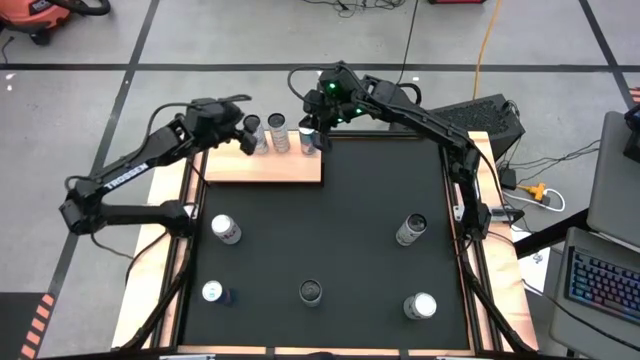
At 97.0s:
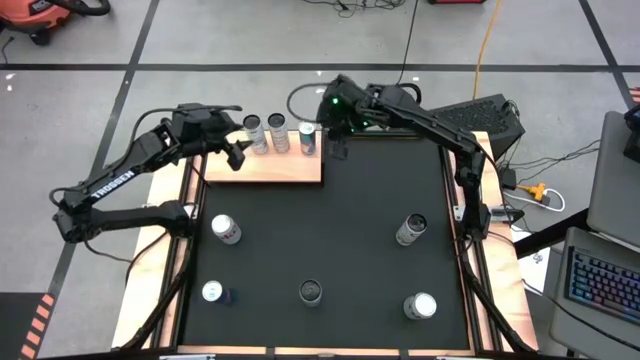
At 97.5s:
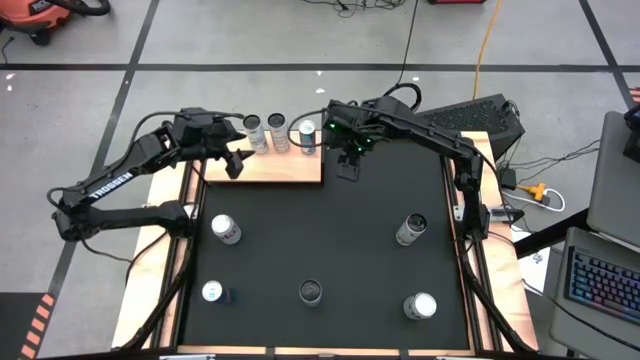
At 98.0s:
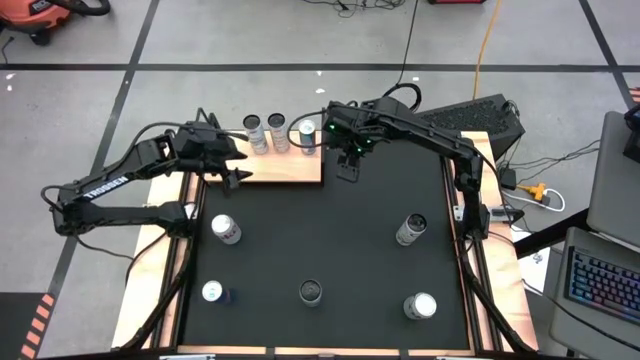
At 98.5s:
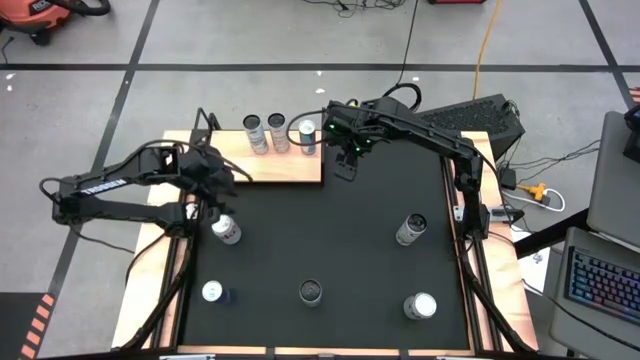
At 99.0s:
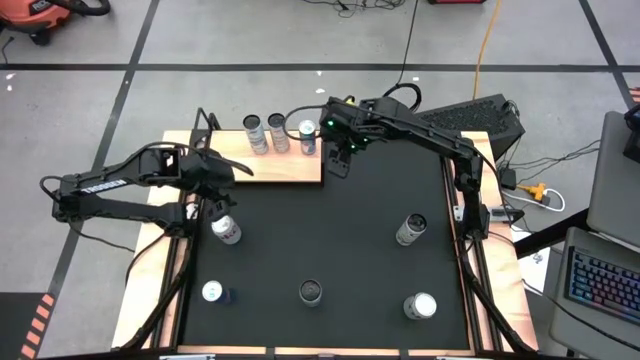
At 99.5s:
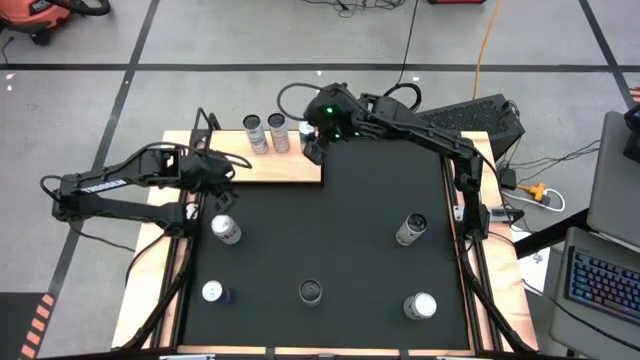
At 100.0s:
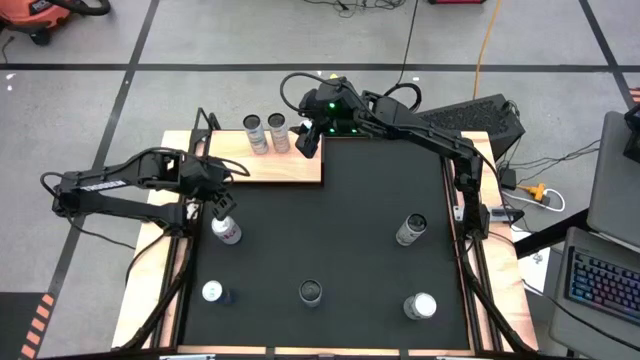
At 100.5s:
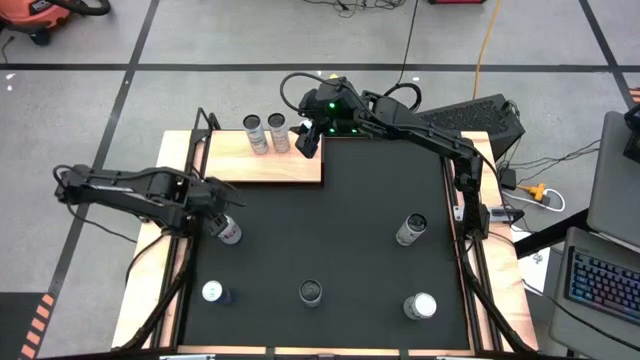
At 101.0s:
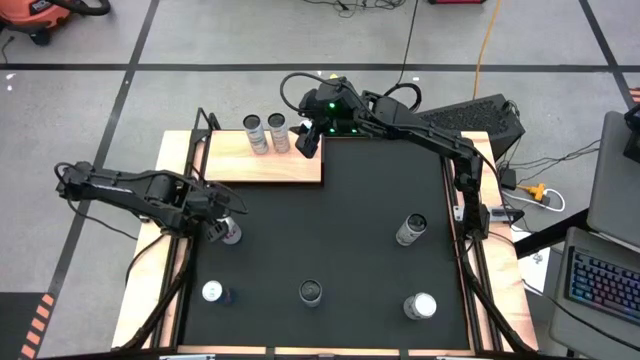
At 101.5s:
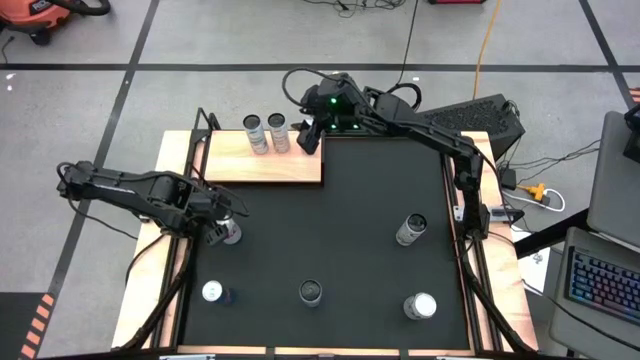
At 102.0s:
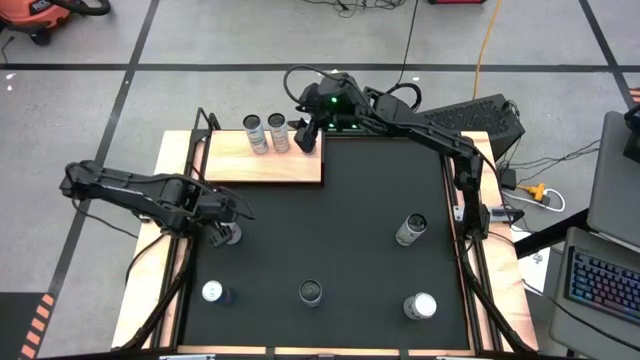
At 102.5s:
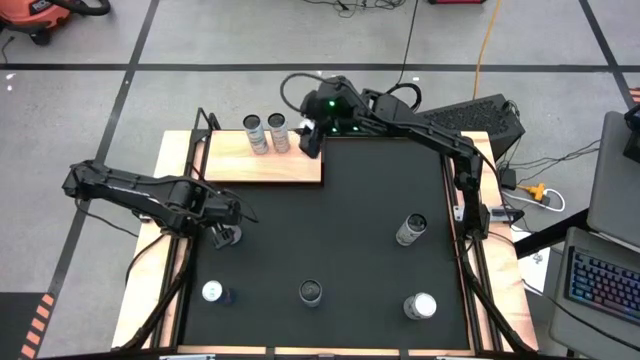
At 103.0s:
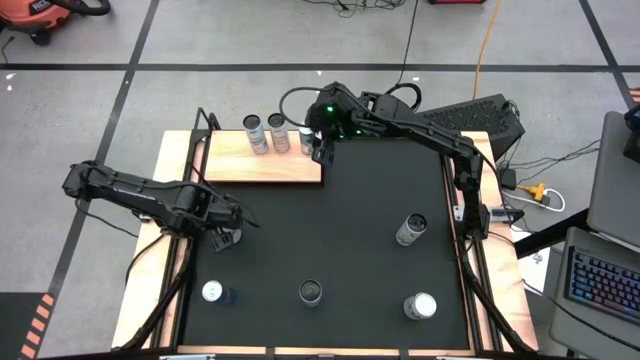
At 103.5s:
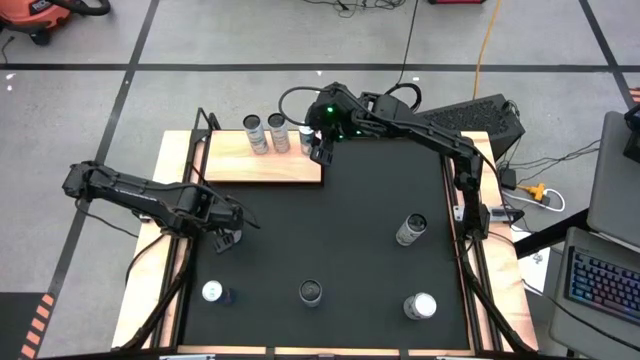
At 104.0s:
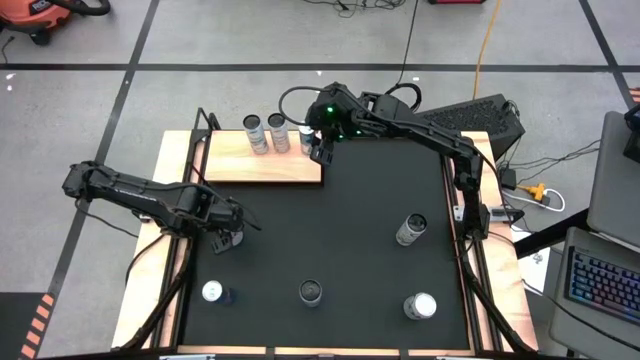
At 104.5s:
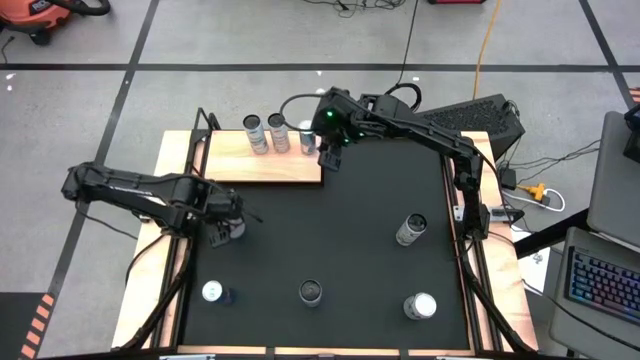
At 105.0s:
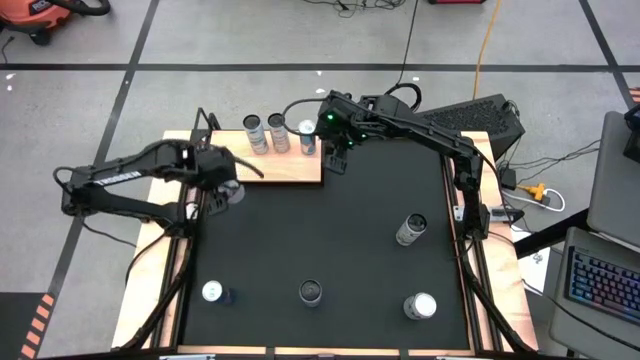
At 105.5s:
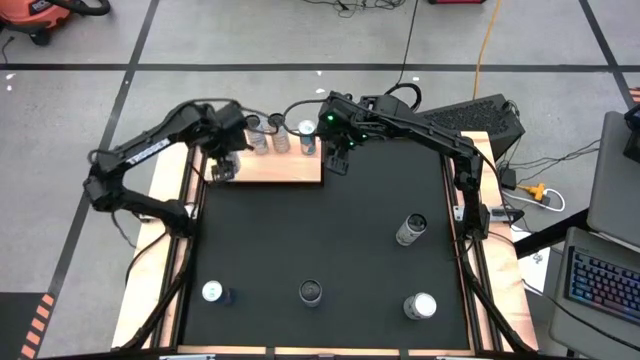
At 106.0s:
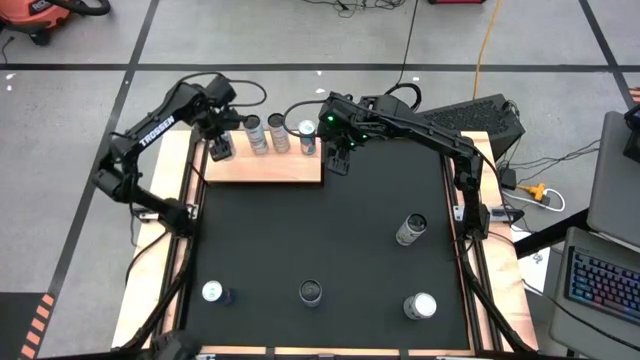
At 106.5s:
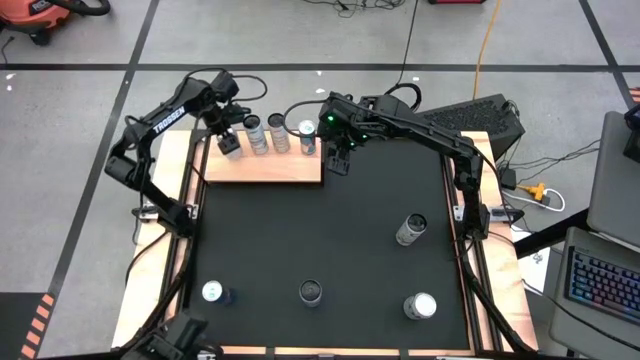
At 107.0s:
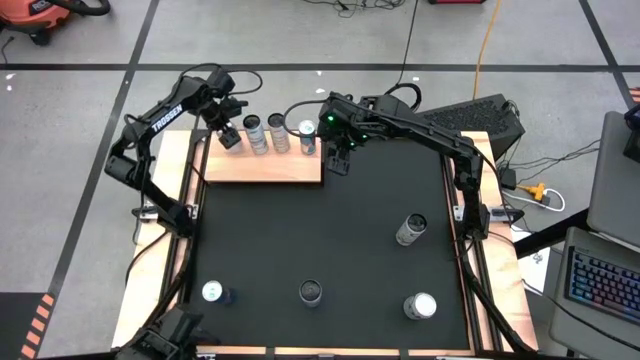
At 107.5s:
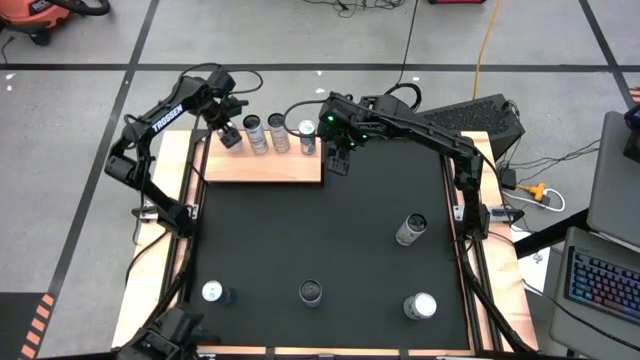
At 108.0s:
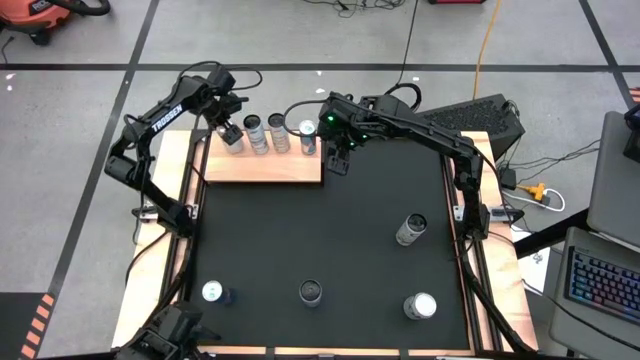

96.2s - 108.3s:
Task: Place canned beverage on shelf
Put the top red silver soda can on the shelf

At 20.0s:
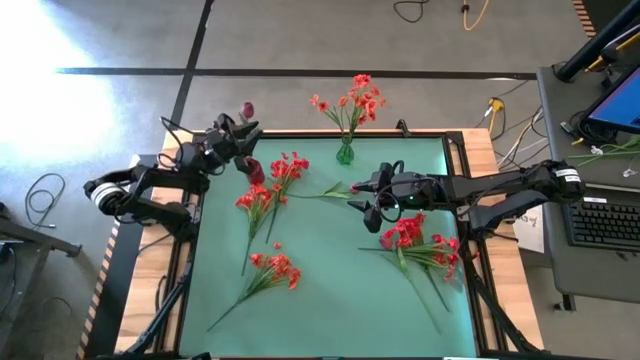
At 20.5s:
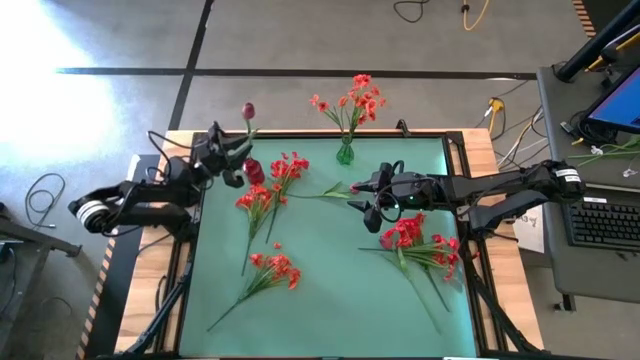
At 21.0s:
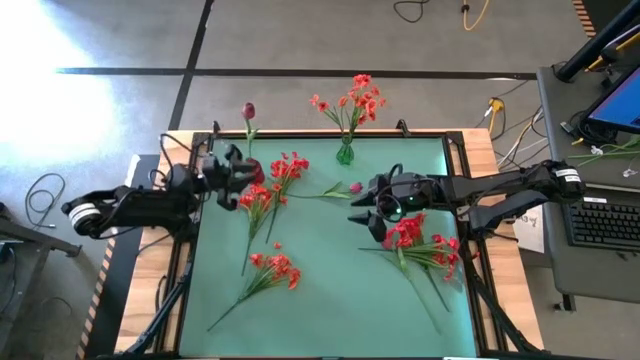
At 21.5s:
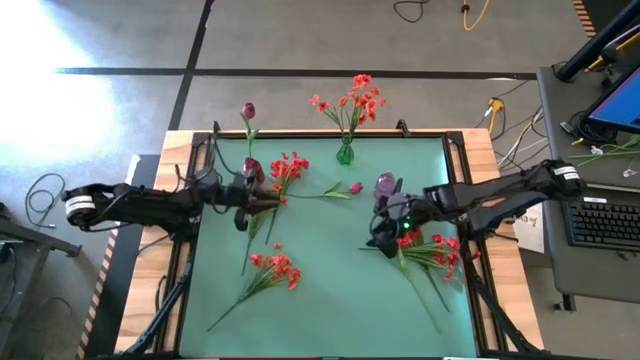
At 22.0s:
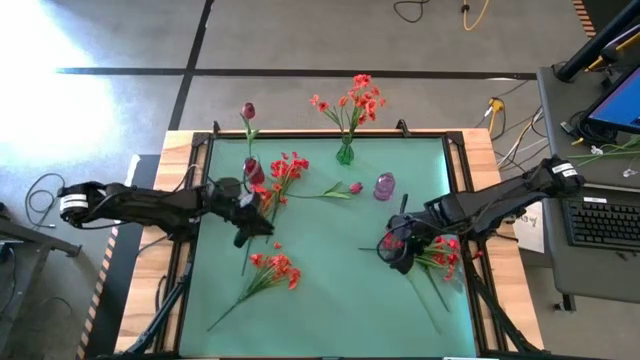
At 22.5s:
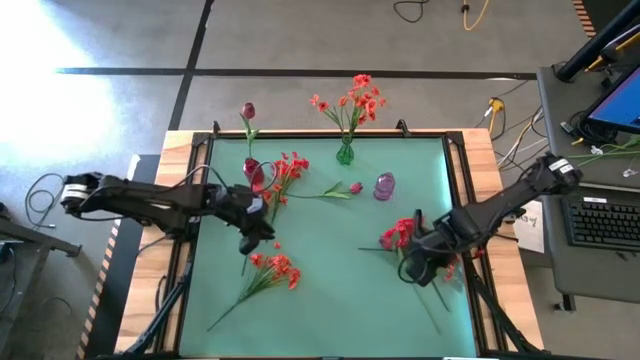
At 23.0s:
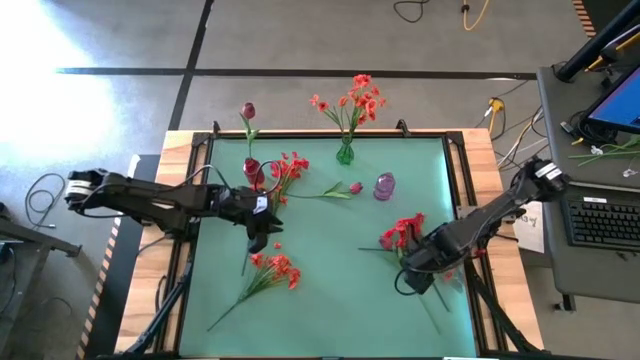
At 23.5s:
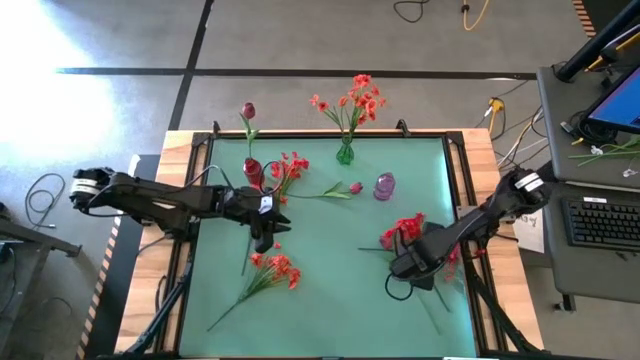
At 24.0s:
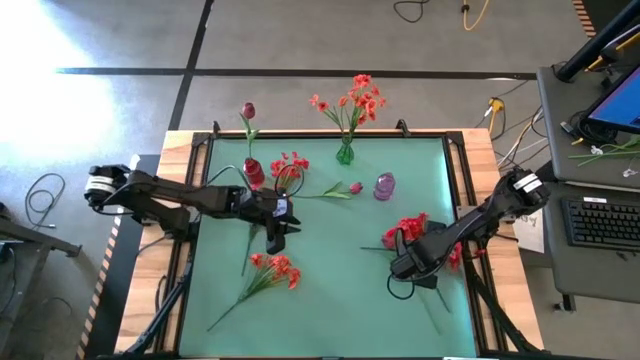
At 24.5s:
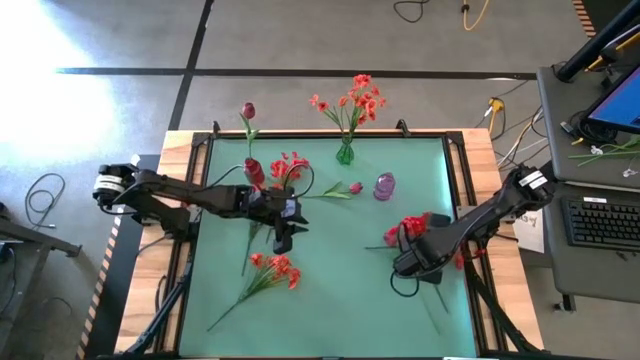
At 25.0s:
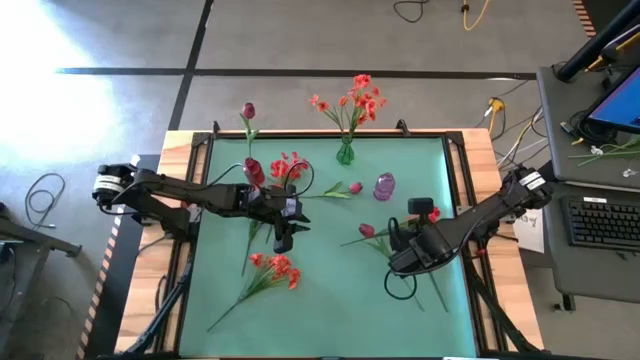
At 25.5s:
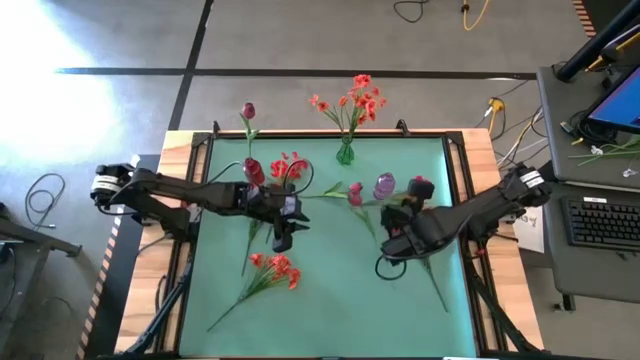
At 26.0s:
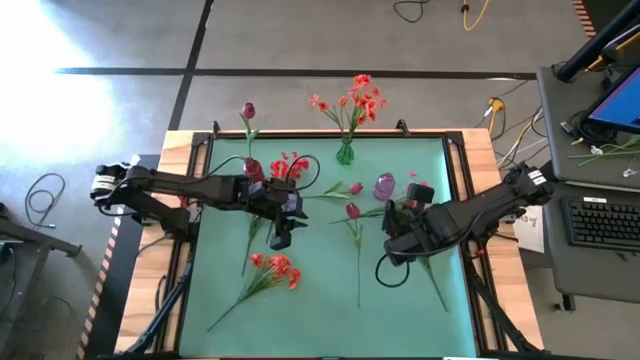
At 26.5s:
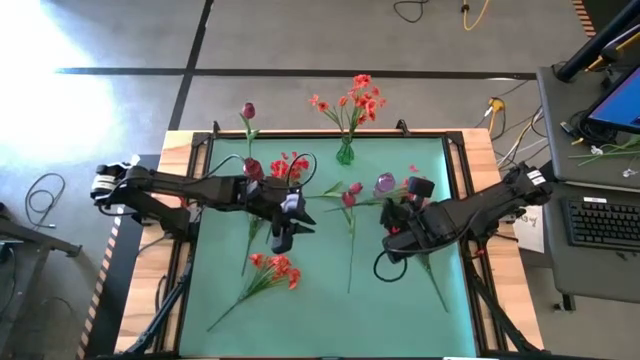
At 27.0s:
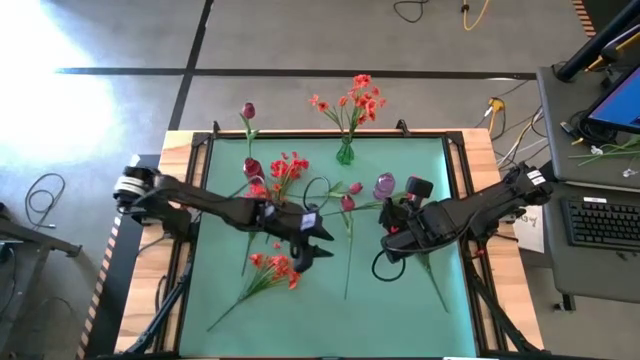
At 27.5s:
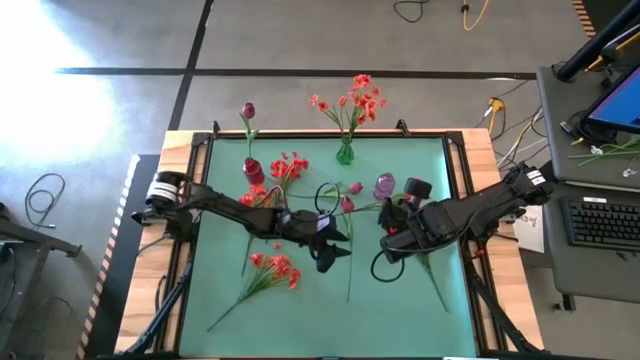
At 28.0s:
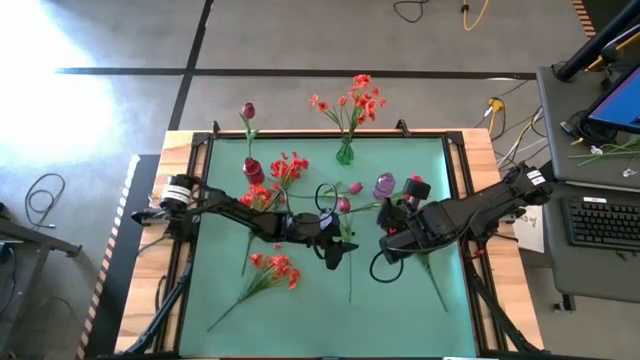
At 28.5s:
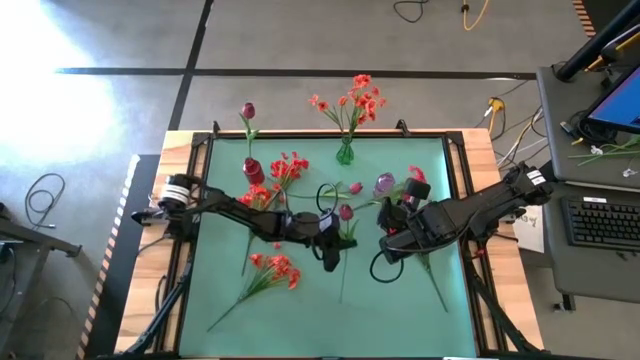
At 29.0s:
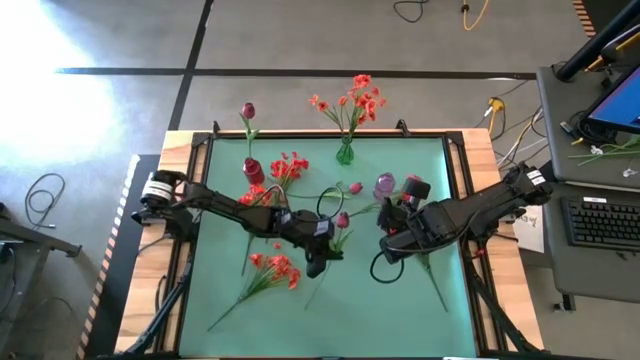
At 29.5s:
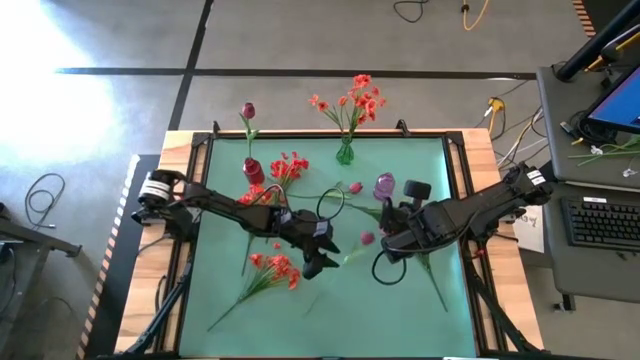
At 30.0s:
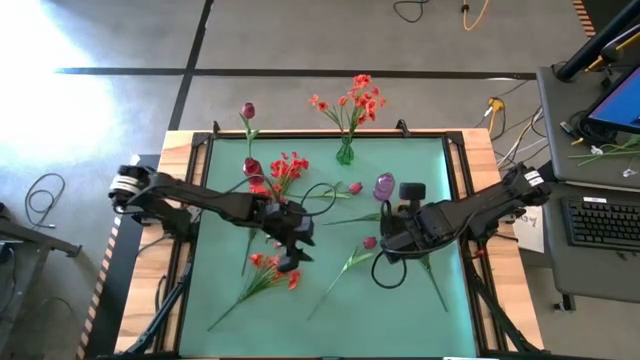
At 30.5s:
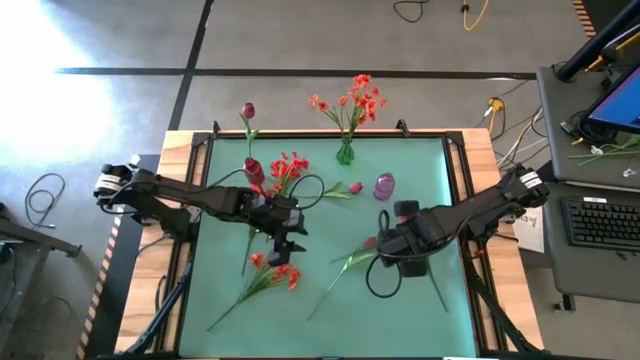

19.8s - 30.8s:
Task: Sort flowers into vase by color
Put the bottom red flowers into the violet flower vase
